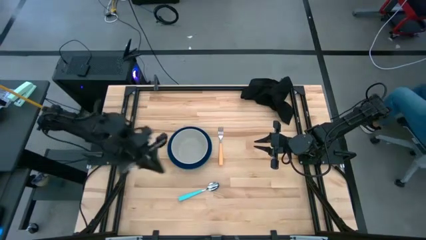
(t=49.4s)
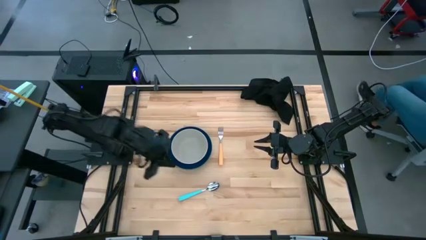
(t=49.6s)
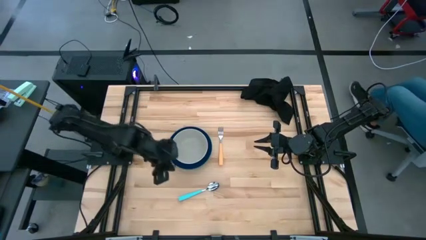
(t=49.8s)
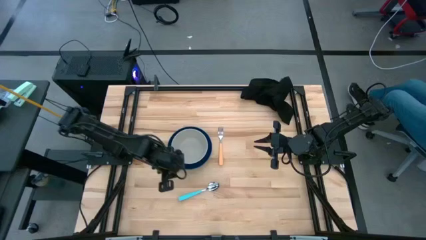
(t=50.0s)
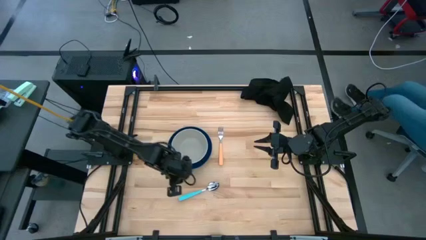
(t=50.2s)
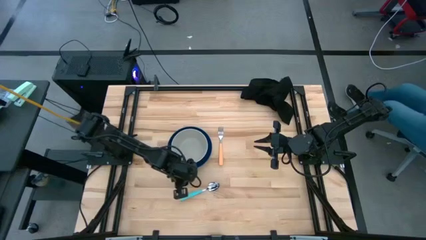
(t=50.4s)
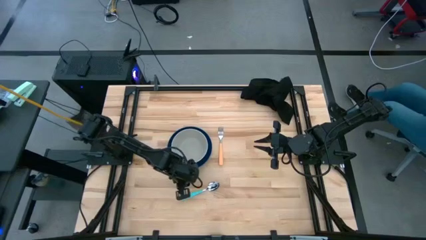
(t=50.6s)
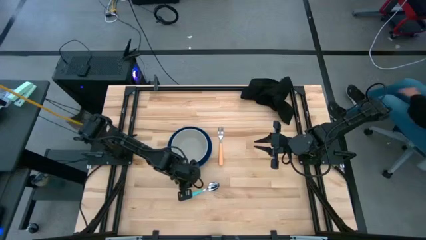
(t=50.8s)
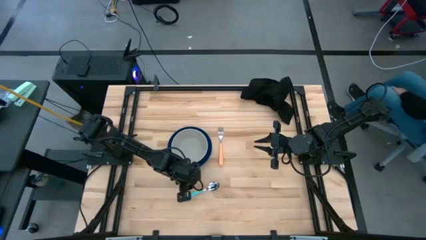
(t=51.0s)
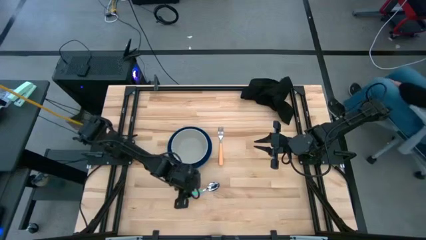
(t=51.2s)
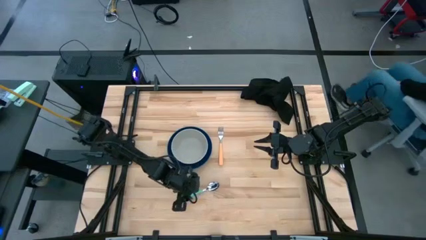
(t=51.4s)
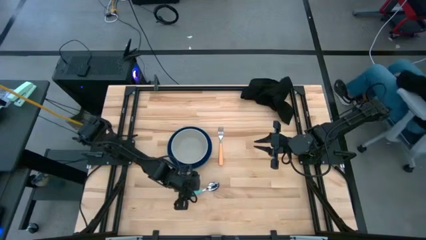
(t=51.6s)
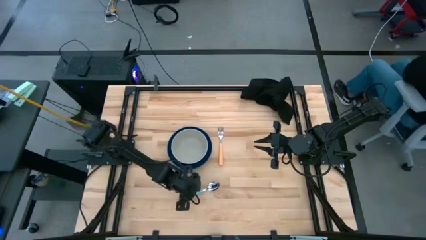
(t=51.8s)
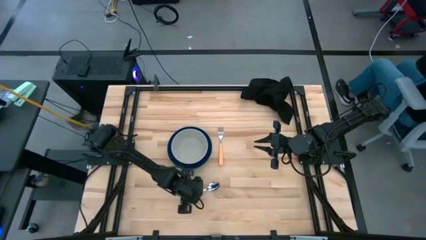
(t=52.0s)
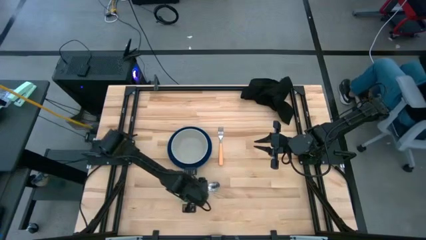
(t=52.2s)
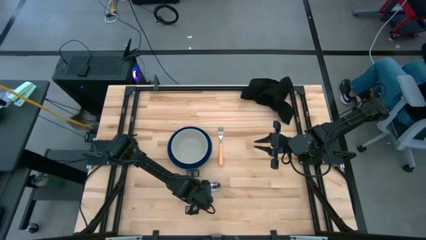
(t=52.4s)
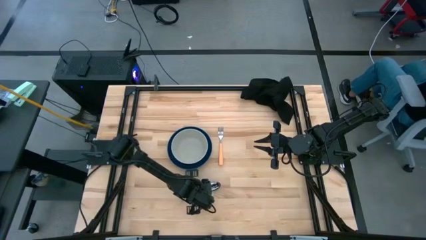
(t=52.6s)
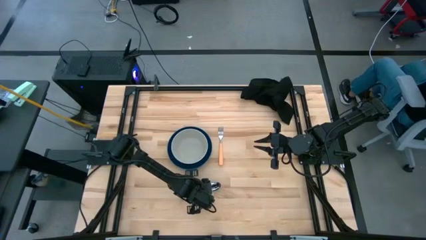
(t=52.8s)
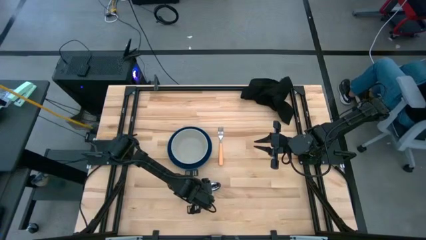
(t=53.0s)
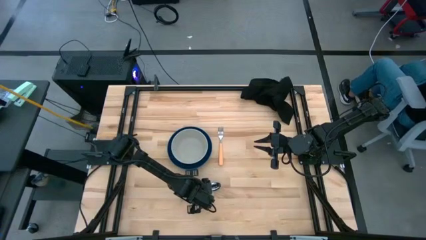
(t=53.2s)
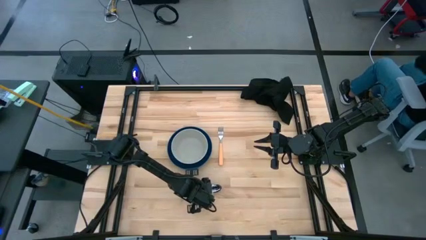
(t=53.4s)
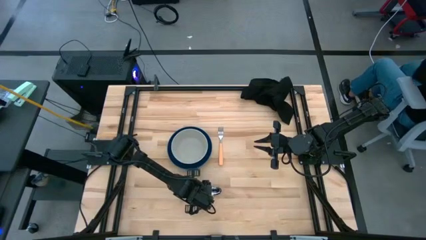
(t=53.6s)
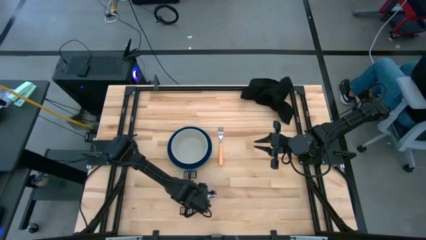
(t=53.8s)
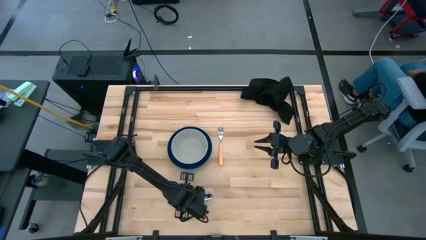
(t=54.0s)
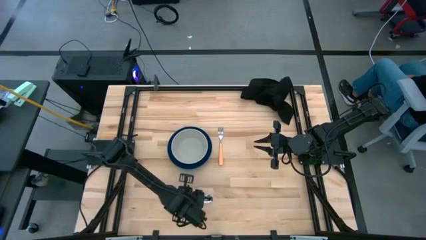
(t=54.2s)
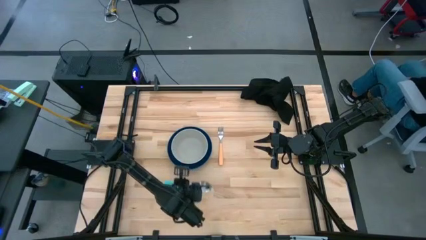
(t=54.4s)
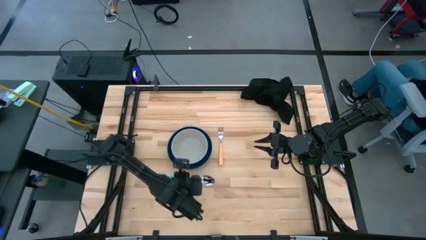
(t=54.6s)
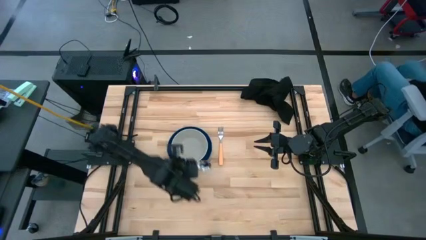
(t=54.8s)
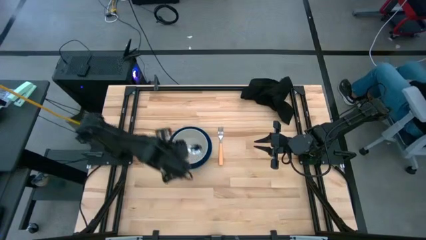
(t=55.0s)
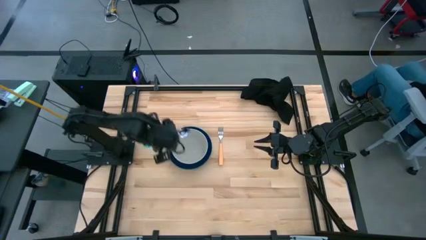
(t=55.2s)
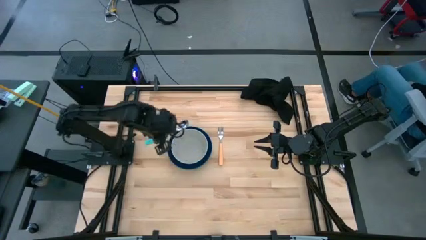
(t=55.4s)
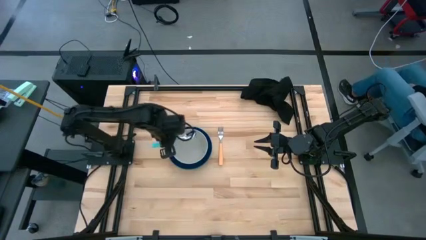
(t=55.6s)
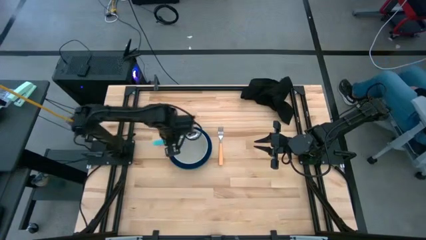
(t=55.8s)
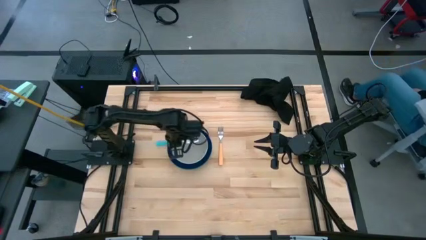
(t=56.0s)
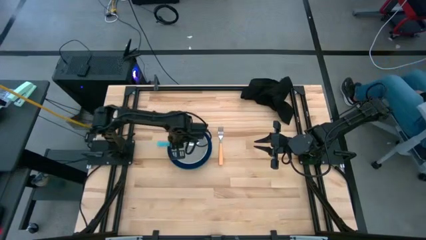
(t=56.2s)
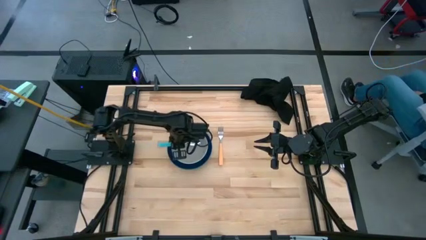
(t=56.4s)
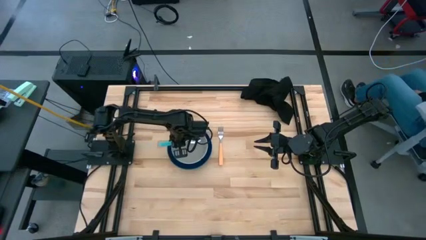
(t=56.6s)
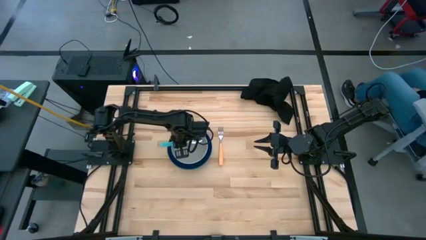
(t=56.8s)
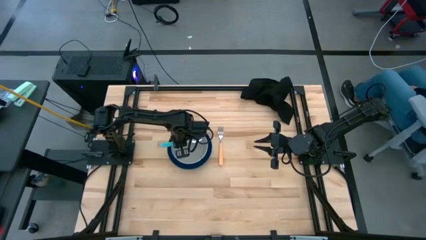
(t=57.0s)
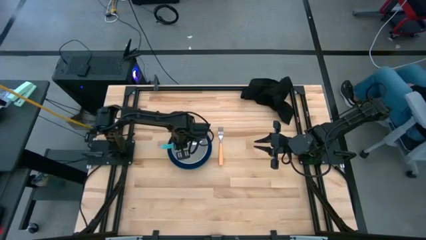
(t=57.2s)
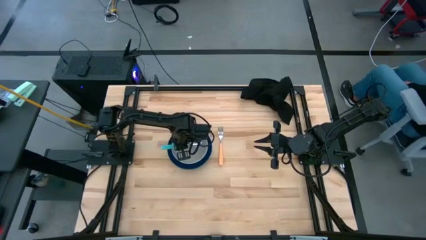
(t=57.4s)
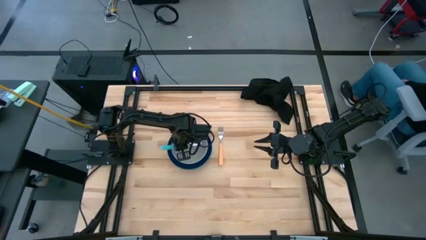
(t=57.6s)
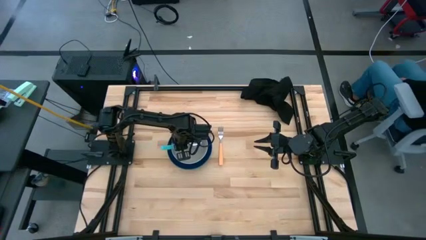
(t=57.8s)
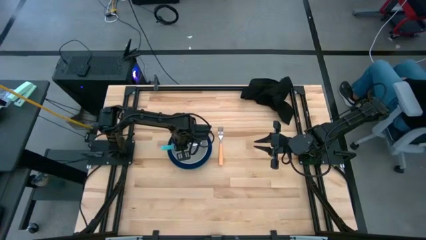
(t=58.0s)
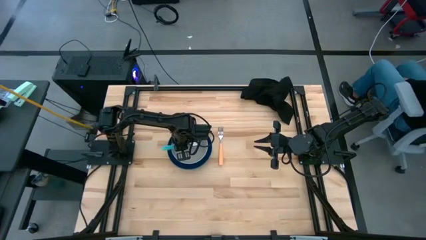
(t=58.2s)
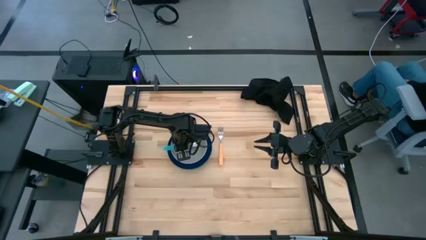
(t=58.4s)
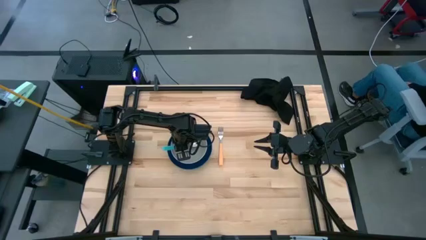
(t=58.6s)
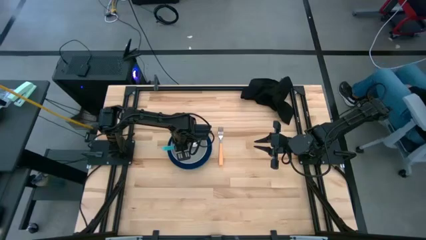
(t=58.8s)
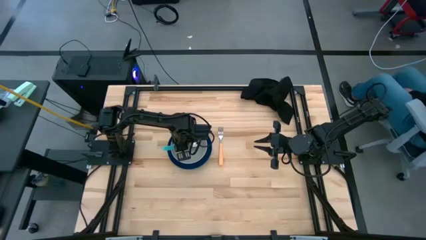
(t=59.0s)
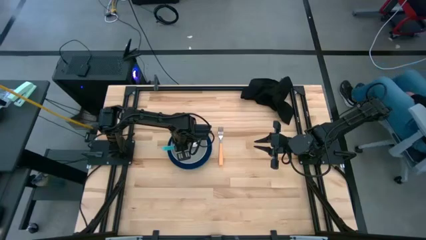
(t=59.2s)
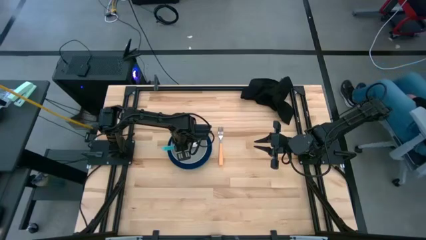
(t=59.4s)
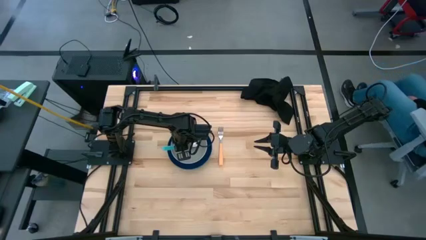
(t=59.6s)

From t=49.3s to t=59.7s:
Task: Set table place
Put the blue spoon into the gray bowl on the table
